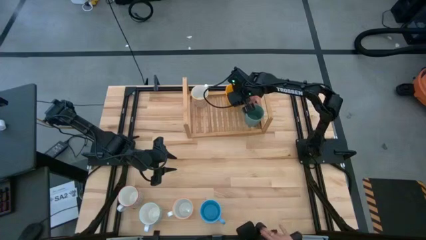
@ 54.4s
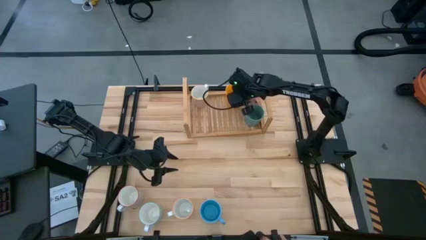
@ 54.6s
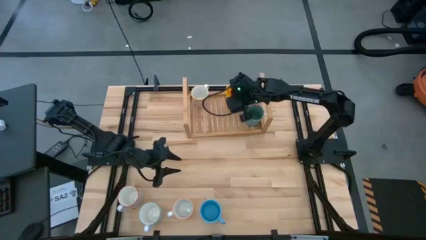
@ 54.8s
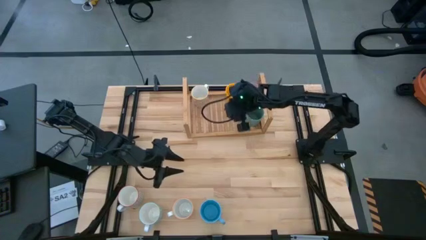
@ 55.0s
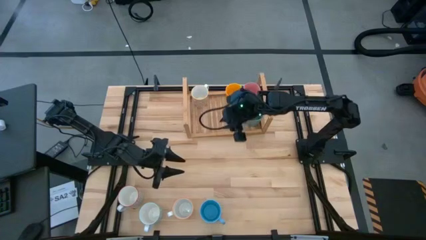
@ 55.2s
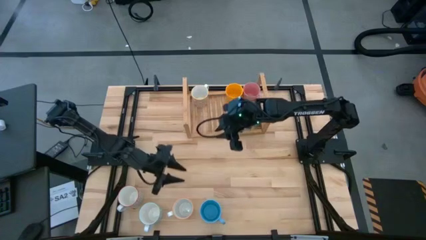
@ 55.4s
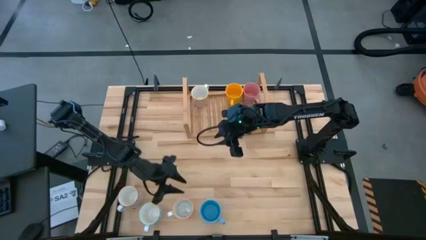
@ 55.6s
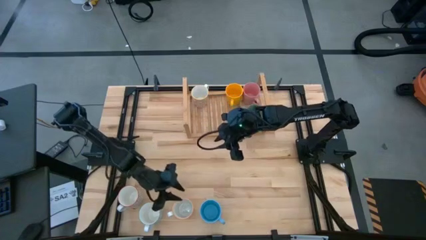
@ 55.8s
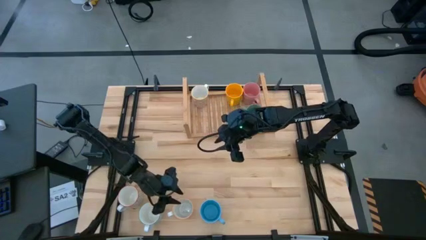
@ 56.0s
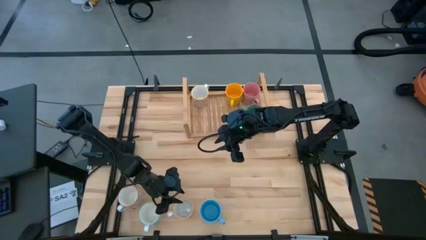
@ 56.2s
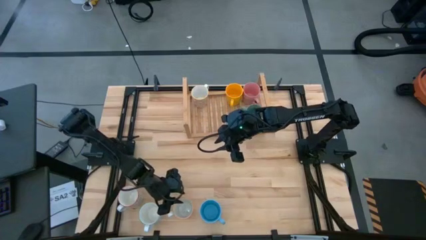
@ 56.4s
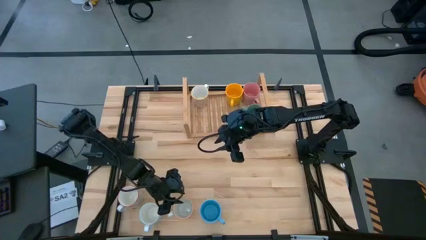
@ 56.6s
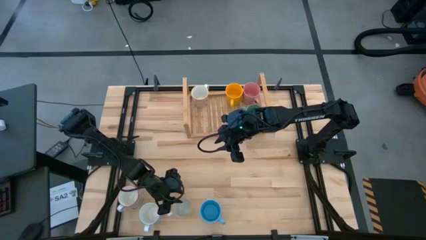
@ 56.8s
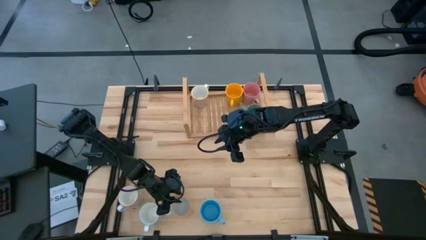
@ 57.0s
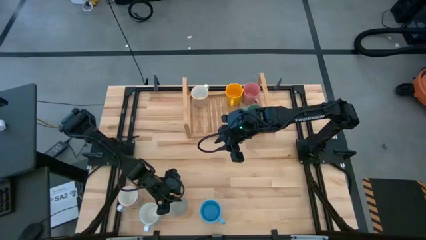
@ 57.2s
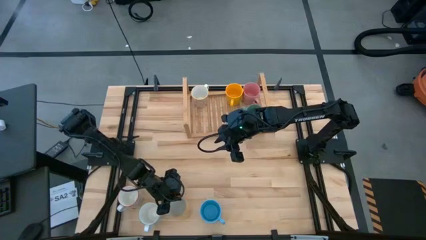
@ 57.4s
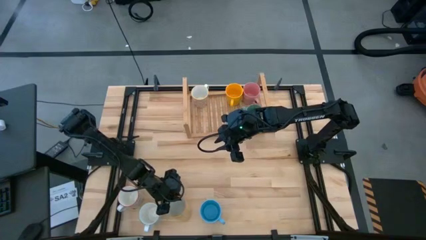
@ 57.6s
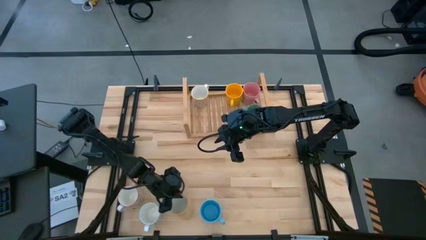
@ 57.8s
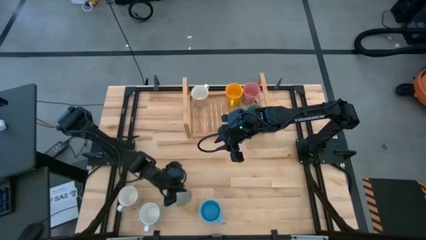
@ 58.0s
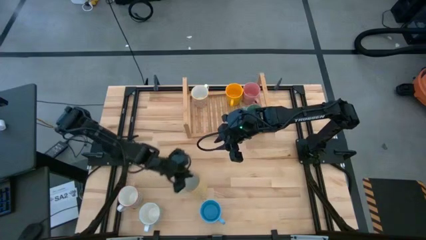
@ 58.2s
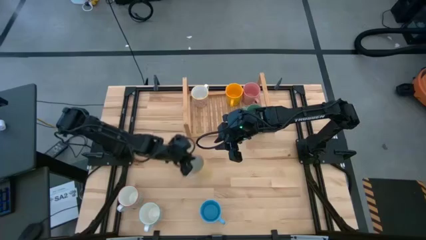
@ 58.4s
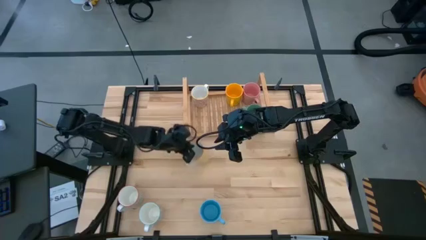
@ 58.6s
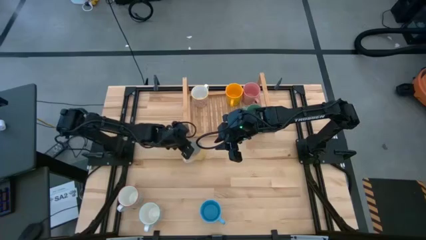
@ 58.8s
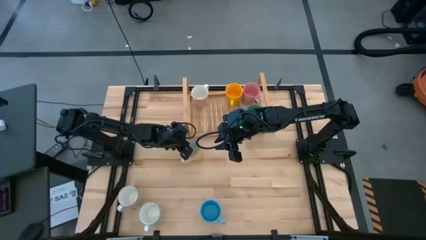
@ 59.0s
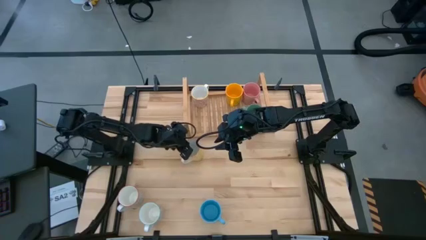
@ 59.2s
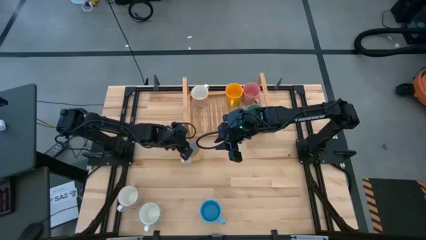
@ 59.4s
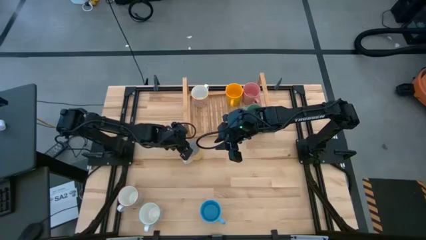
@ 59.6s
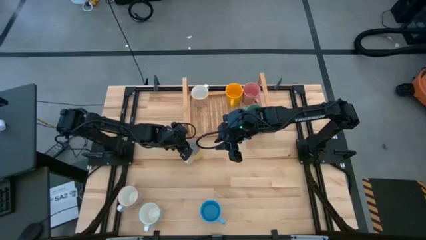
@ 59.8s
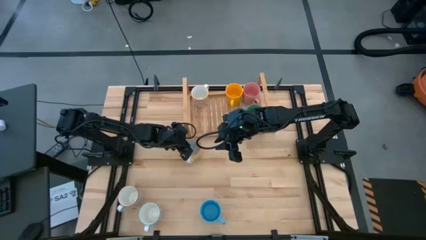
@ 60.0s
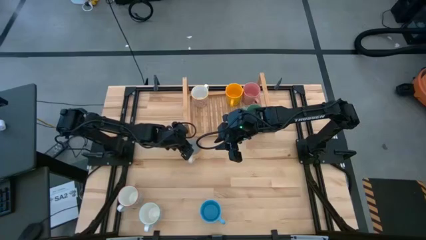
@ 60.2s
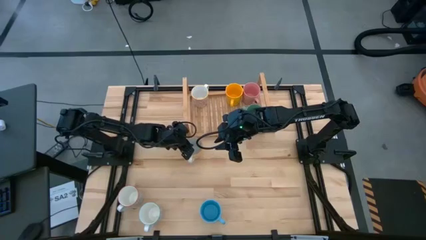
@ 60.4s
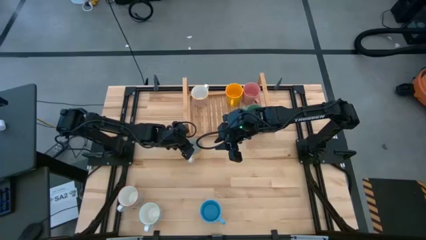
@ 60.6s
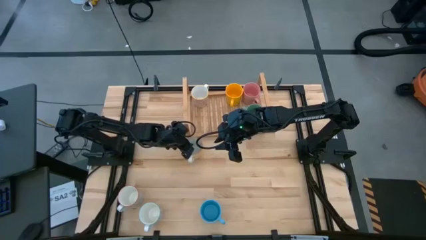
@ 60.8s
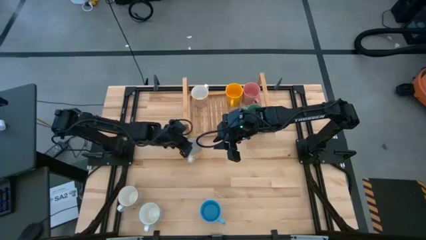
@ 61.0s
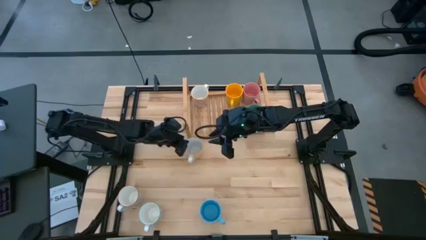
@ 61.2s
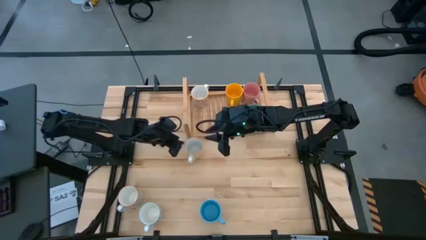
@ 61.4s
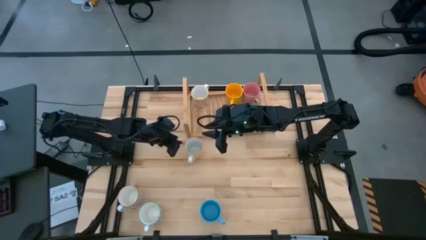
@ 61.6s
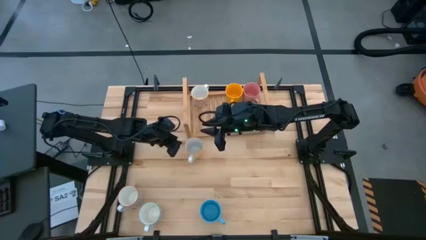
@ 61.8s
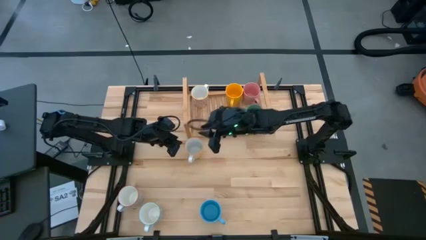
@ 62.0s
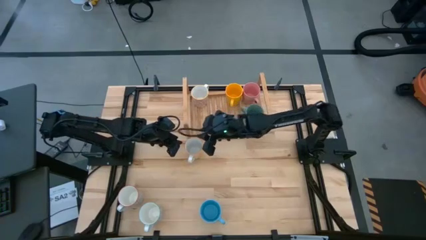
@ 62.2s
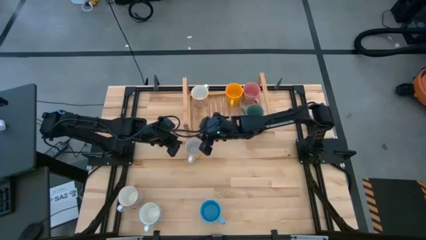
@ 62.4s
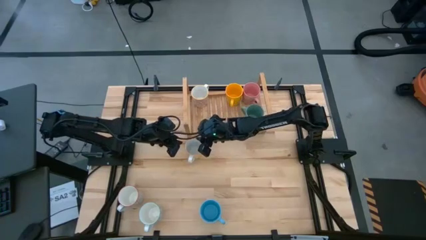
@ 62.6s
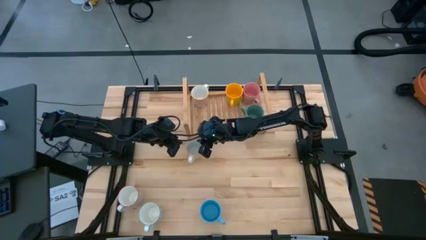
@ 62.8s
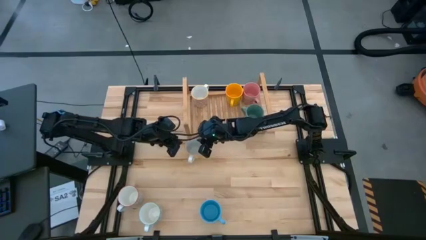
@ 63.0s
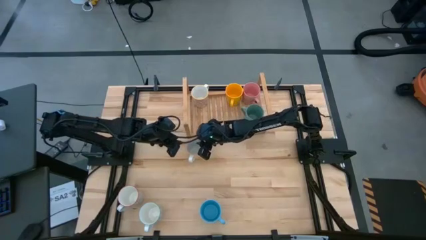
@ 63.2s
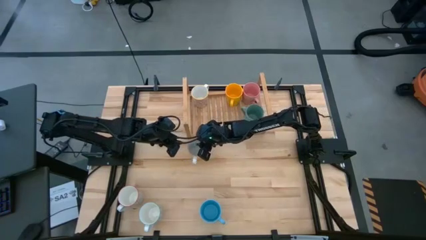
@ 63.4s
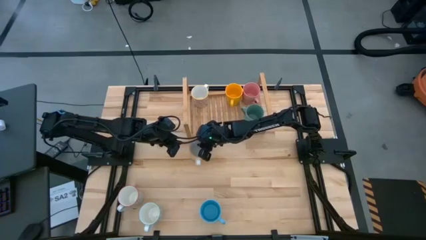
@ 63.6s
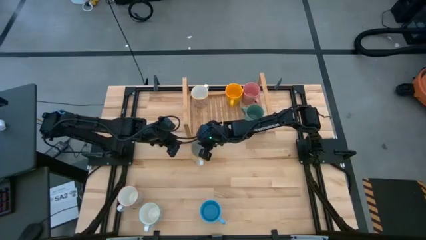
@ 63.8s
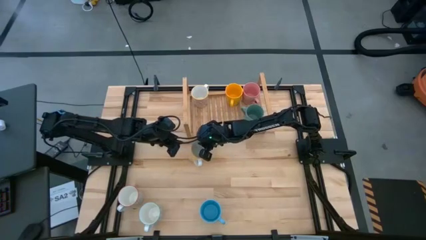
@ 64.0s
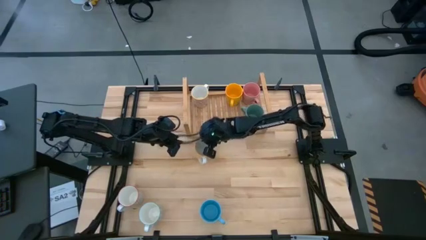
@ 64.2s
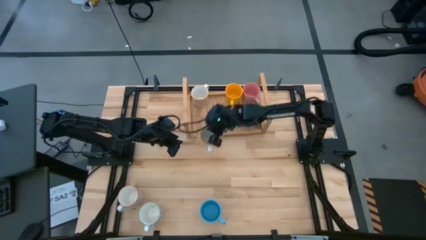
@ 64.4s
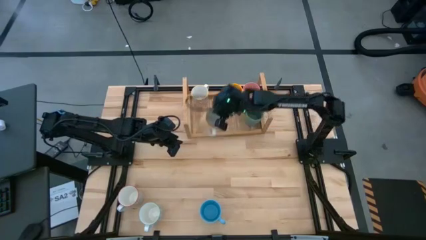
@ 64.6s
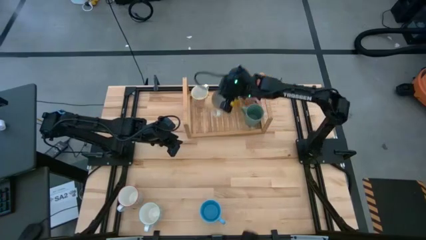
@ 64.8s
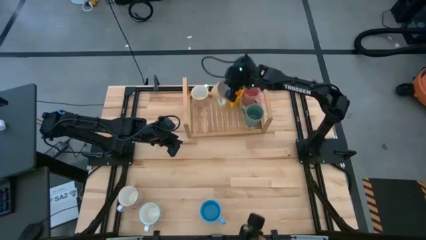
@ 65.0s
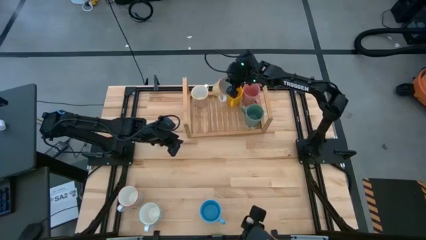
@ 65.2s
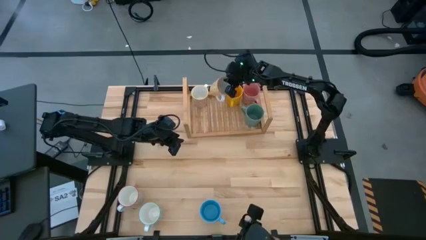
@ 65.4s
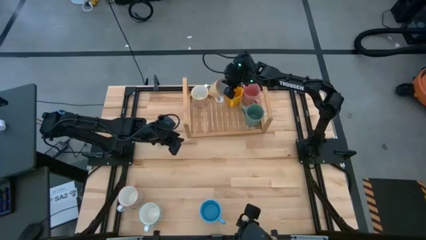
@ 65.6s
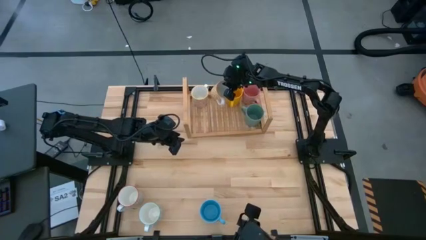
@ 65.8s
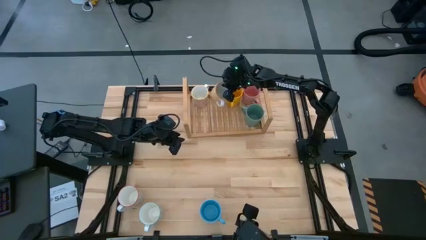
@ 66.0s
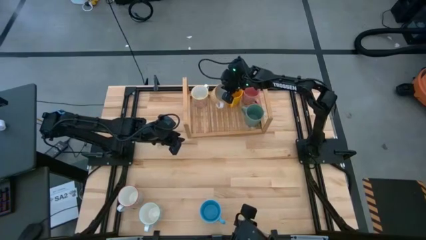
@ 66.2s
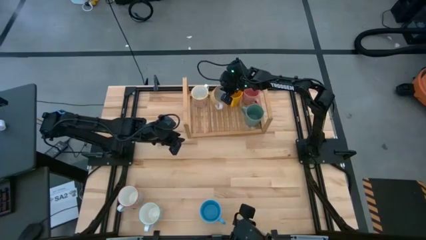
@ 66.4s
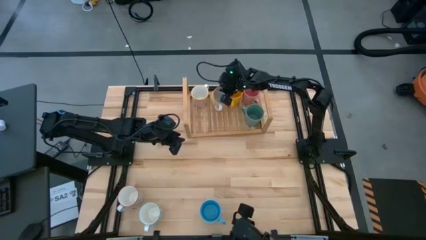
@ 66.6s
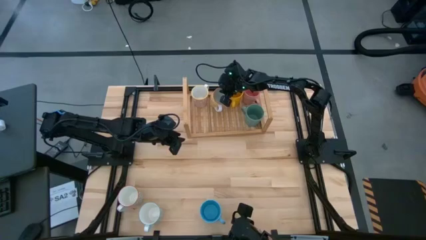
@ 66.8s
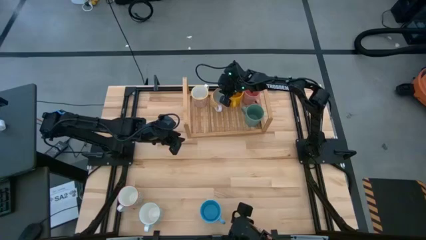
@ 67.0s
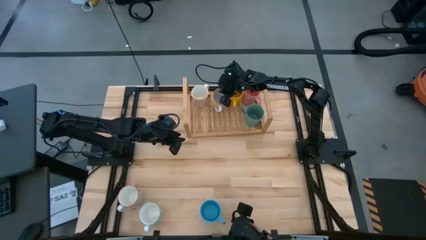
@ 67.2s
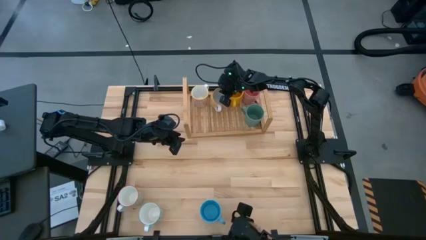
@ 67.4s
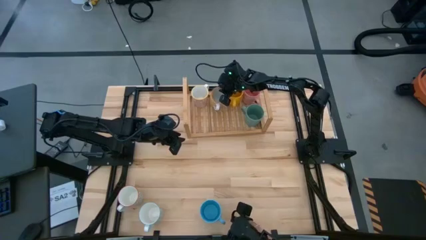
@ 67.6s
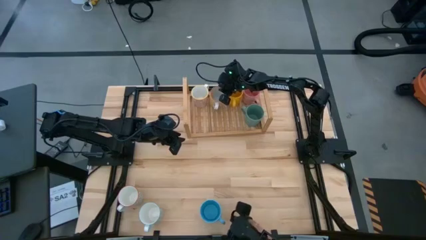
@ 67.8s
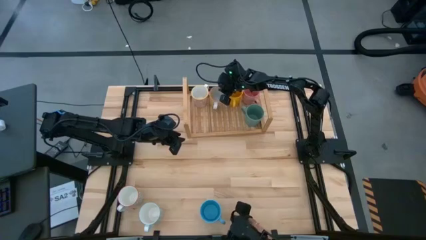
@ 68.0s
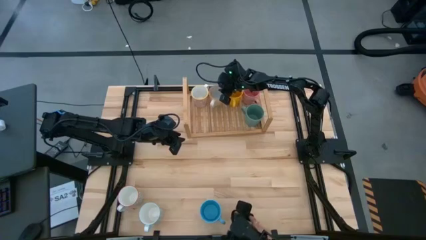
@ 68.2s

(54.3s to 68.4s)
Task: Place coffee mugs
Put the yellow patterned mug on the shelf

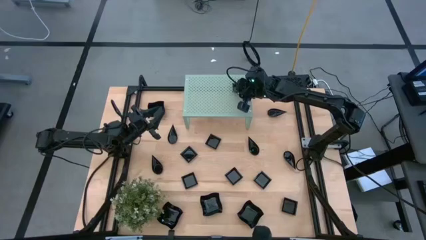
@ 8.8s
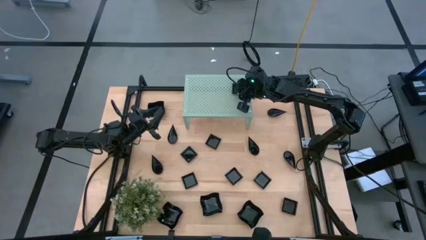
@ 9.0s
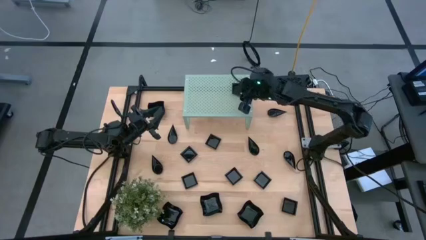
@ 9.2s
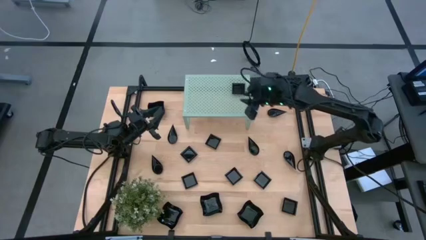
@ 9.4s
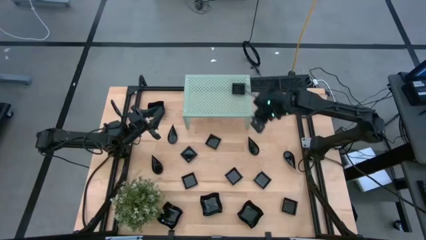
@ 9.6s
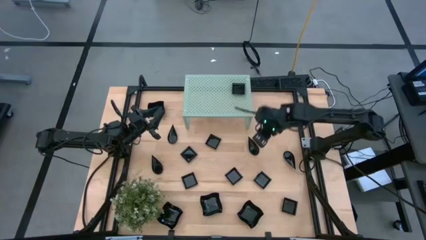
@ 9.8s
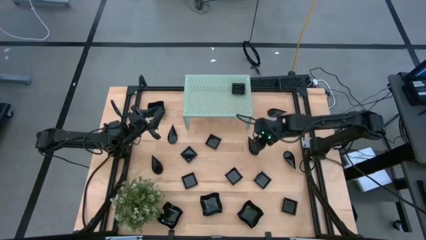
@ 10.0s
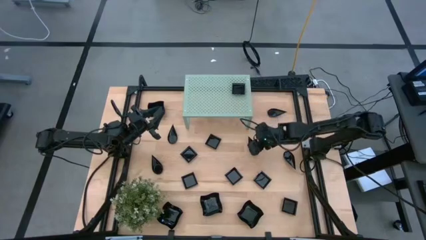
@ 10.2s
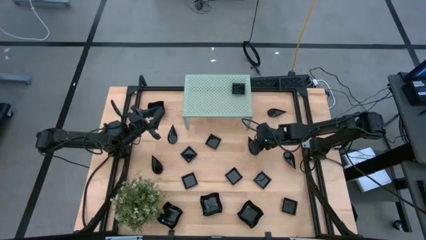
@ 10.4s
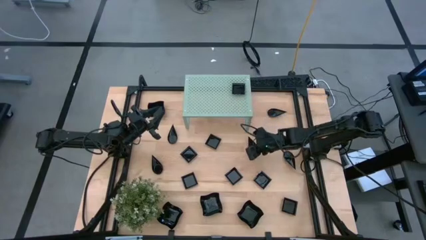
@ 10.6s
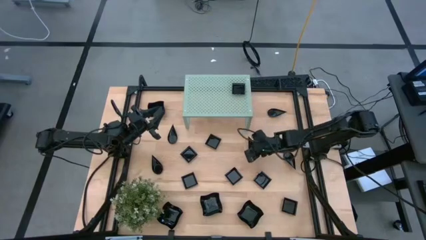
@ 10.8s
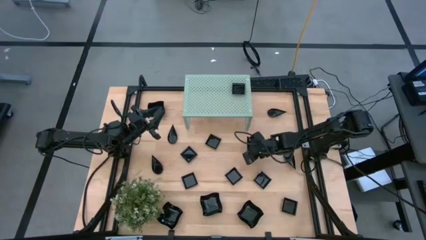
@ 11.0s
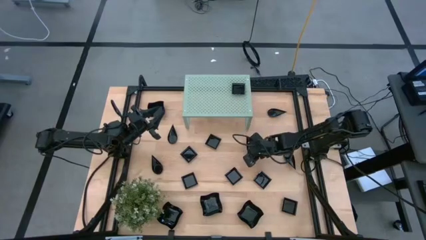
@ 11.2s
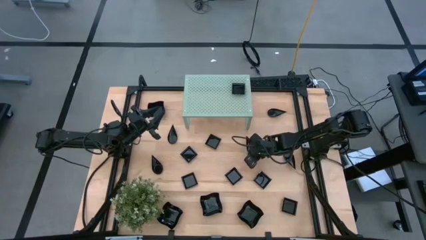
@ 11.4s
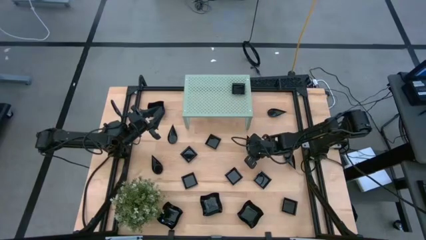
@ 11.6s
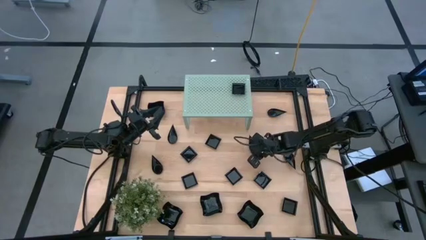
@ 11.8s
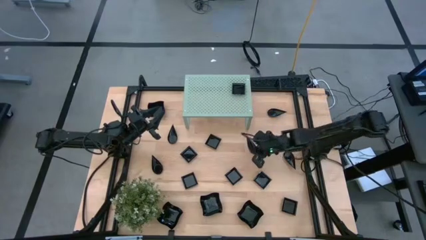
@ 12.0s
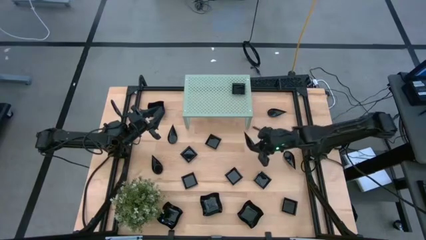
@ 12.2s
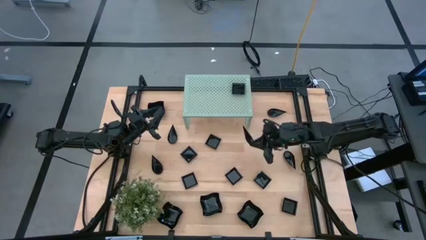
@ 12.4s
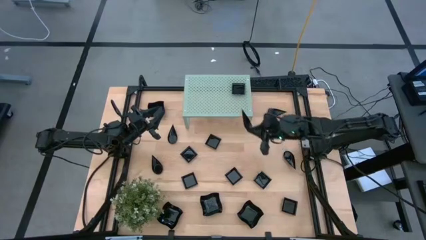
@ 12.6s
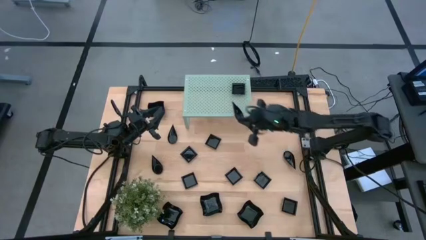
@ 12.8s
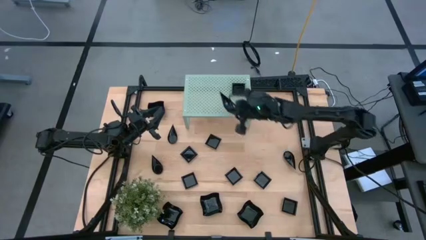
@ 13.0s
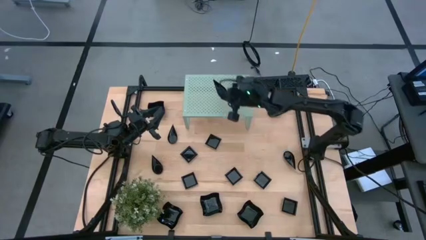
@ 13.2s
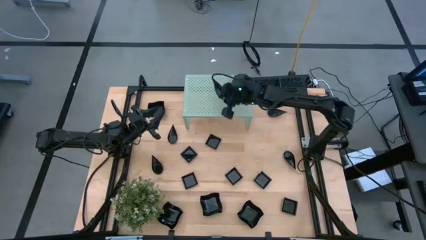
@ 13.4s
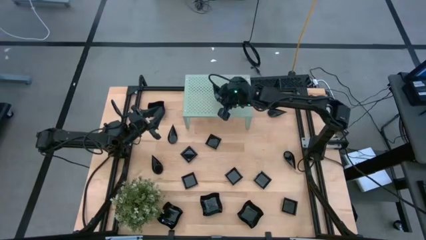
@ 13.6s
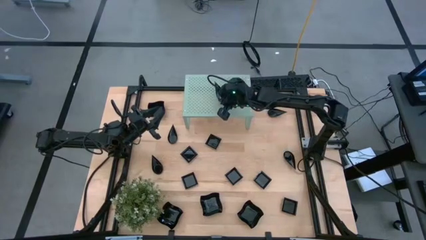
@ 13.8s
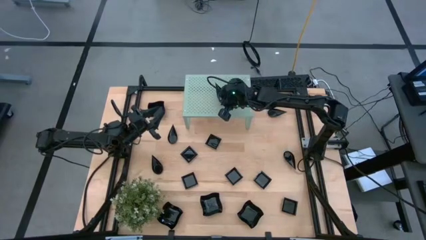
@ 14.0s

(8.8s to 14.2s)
Task: Pick & Place Mini shaped plates
Put the black drop-shaped plate on the shelf
